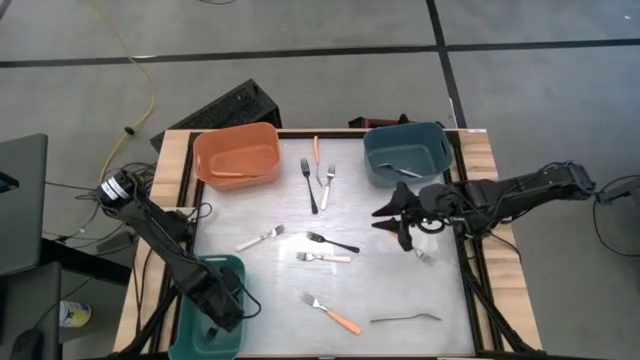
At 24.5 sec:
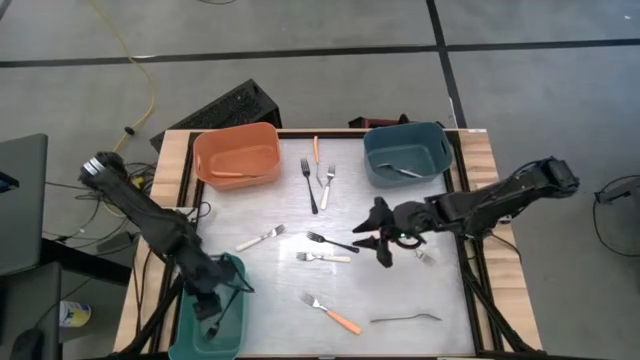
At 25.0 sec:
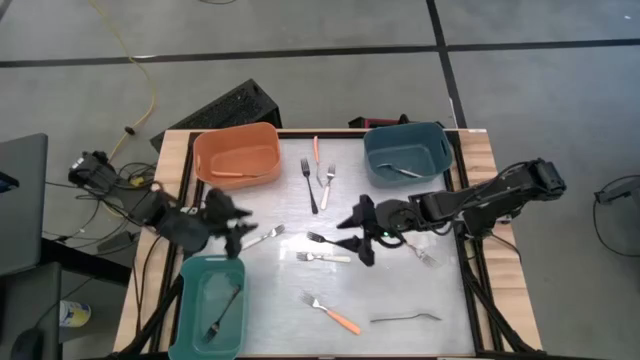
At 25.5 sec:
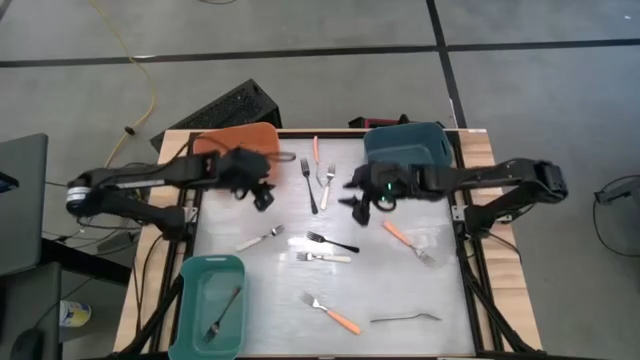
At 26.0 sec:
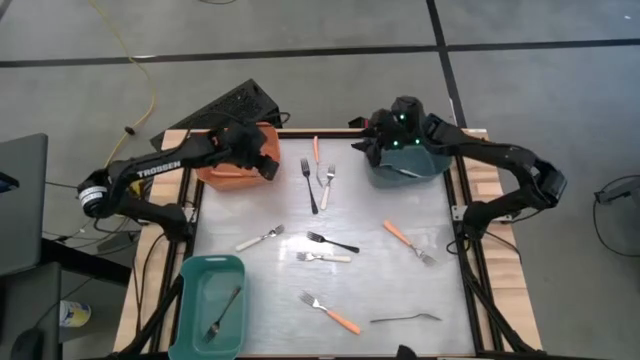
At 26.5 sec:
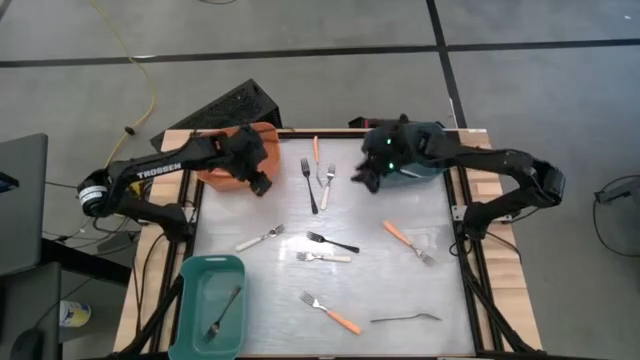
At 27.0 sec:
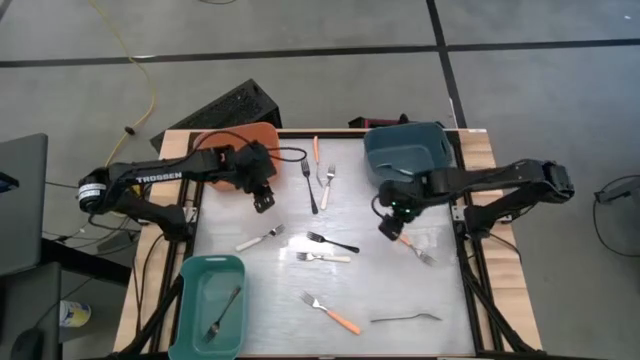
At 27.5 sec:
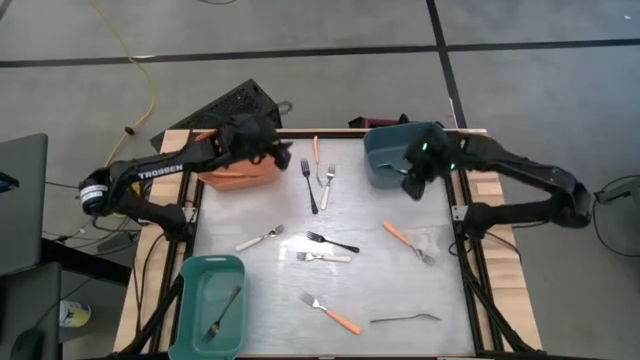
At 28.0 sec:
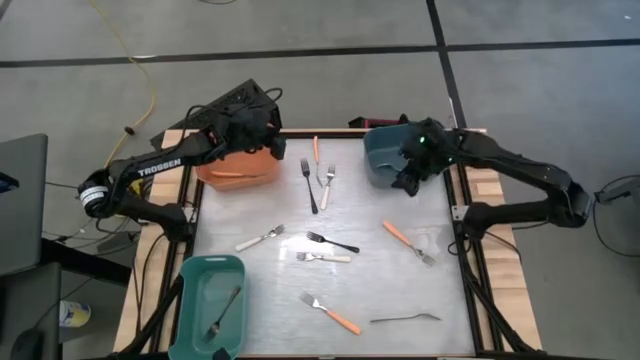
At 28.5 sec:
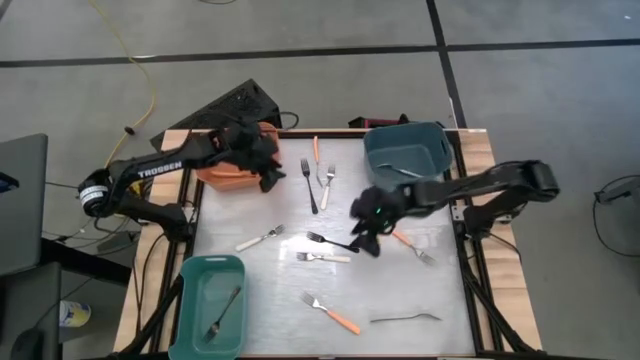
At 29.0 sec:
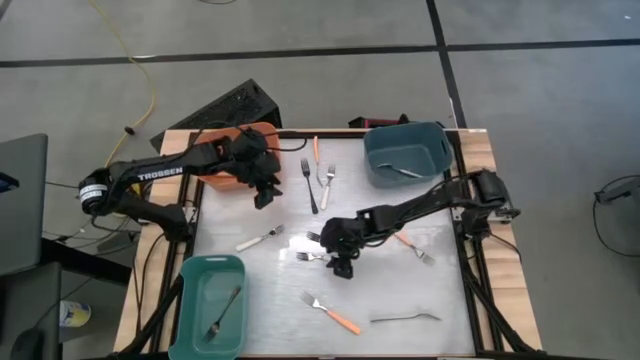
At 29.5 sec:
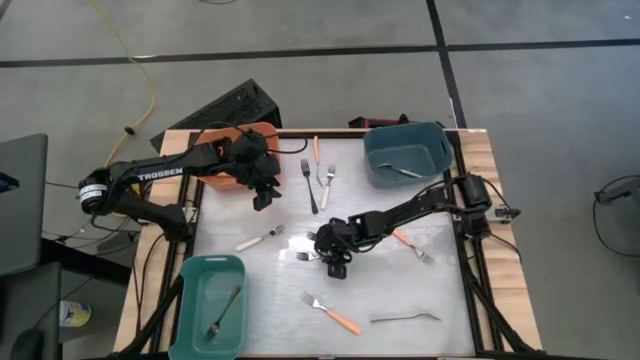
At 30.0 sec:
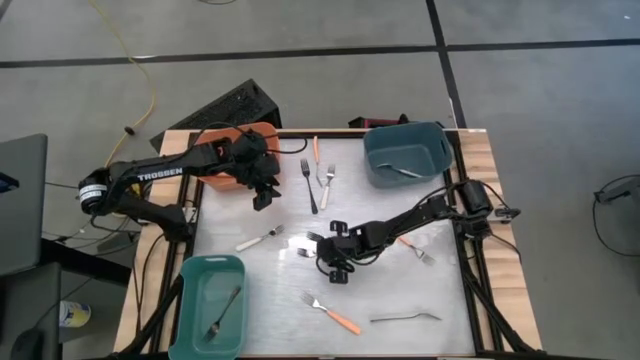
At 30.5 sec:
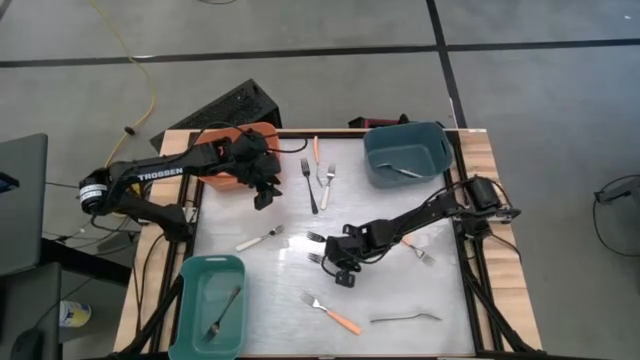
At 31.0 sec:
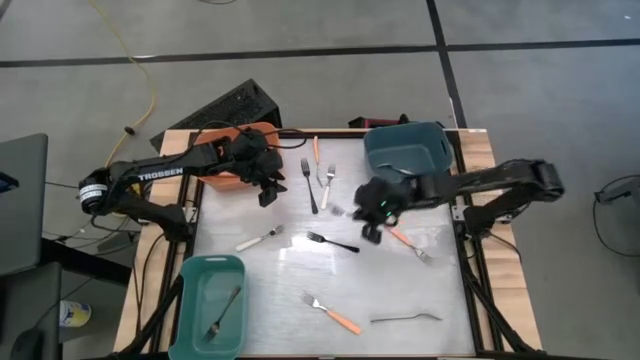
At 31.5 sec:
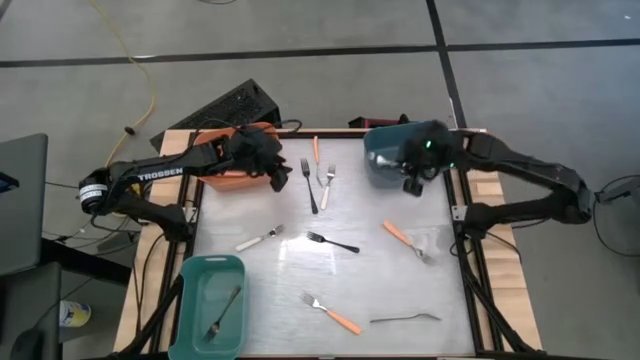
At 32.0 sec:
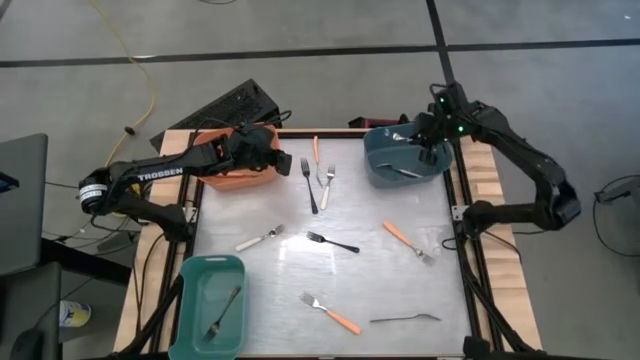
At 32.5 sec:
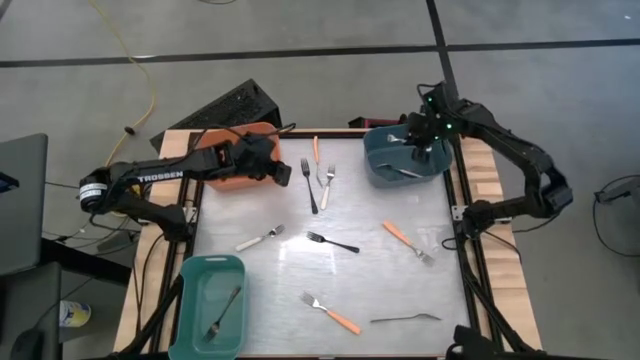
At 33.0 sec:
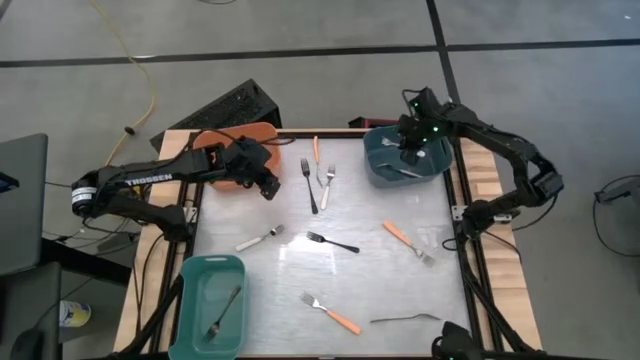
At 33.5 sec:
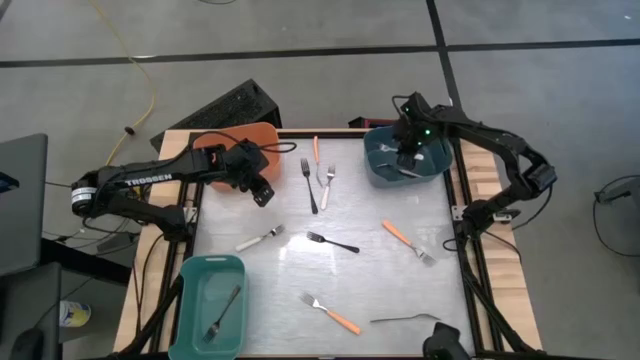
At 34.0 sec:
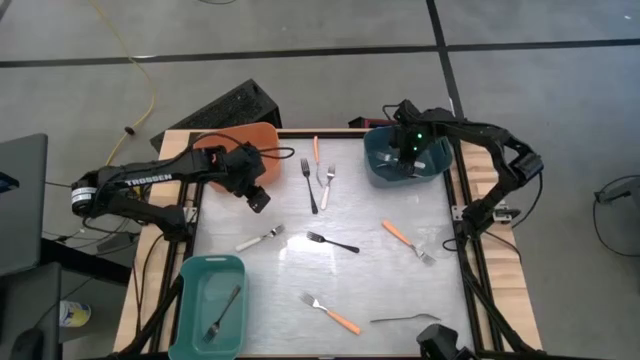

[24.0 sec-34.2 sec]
Task: Sort silverware by color (type)
Put the white fork into the blue bin

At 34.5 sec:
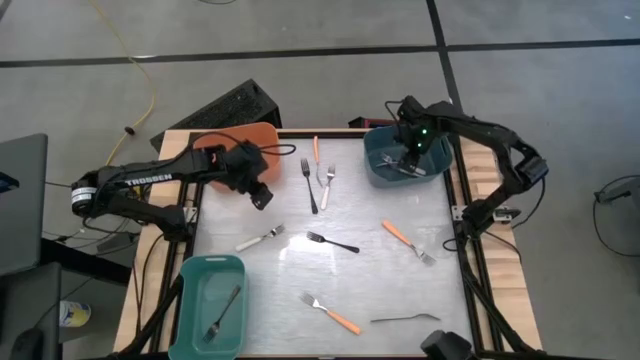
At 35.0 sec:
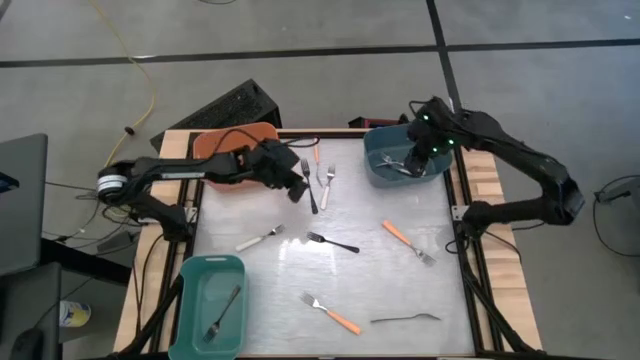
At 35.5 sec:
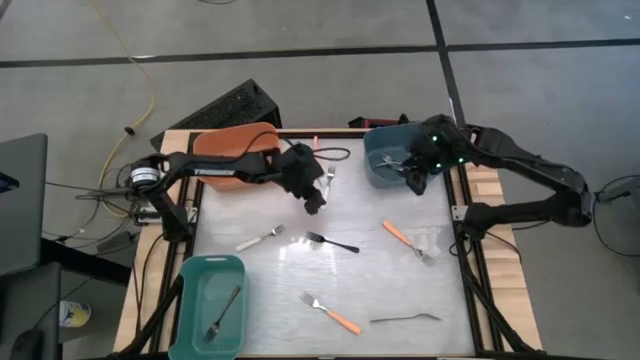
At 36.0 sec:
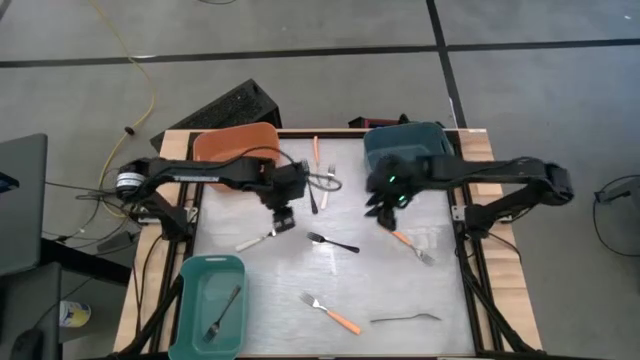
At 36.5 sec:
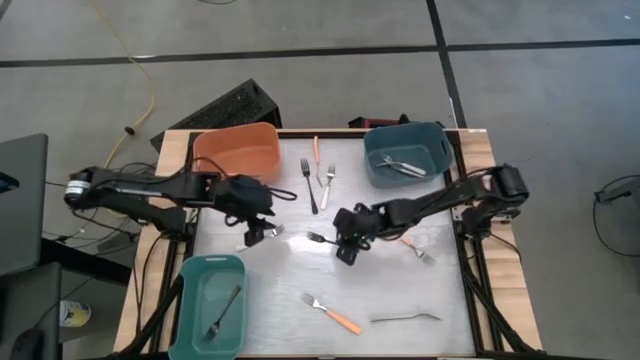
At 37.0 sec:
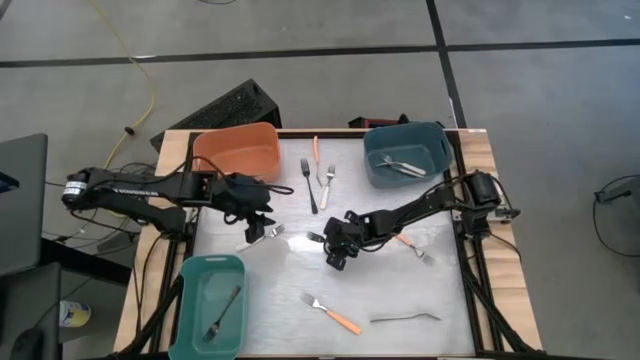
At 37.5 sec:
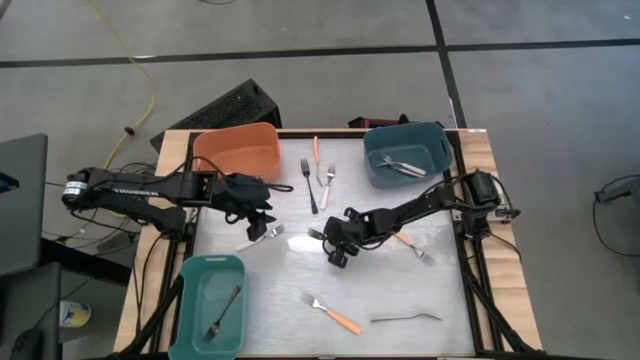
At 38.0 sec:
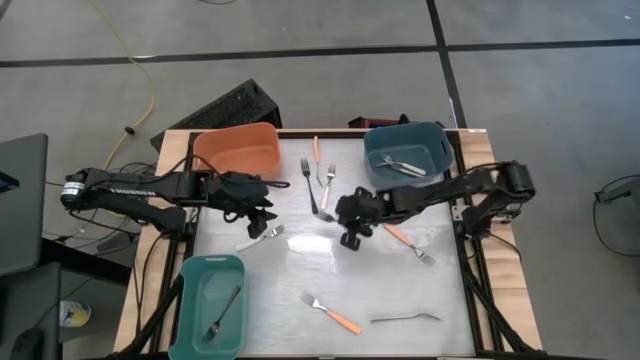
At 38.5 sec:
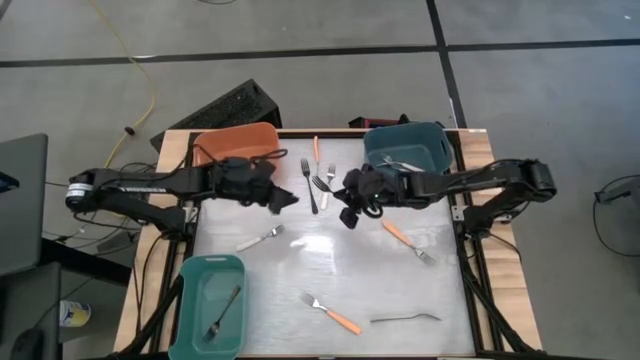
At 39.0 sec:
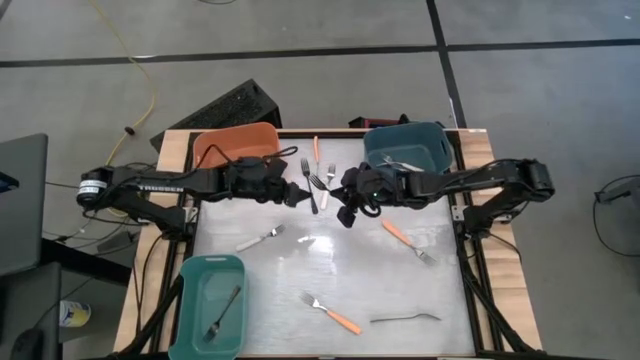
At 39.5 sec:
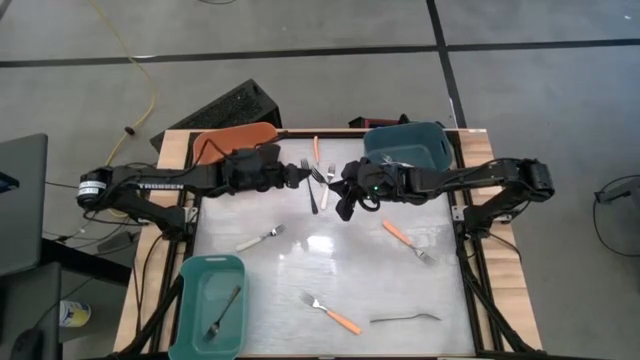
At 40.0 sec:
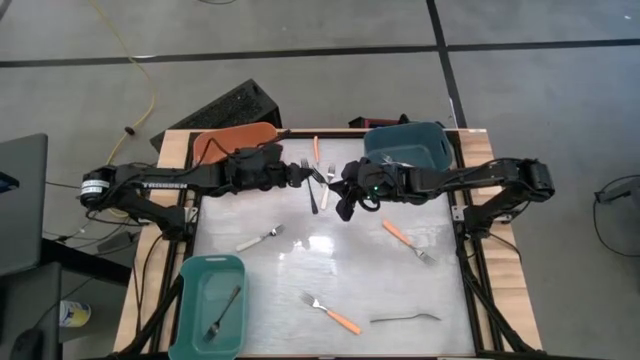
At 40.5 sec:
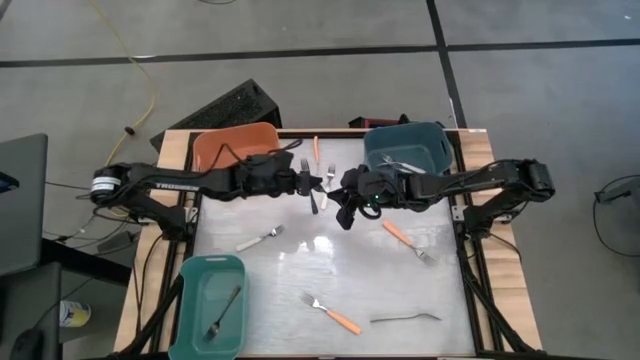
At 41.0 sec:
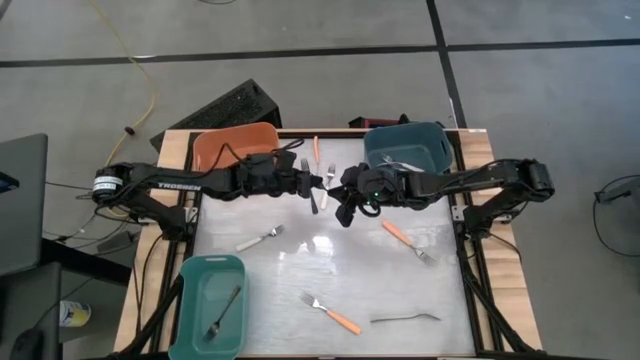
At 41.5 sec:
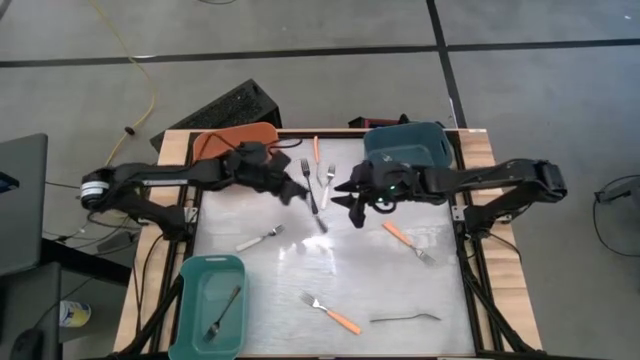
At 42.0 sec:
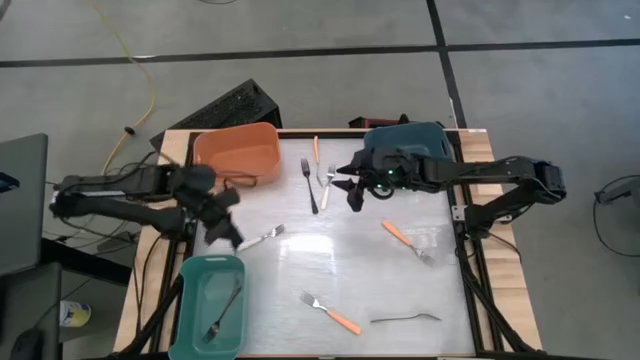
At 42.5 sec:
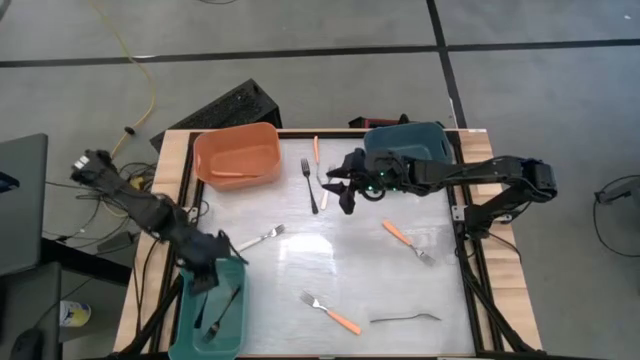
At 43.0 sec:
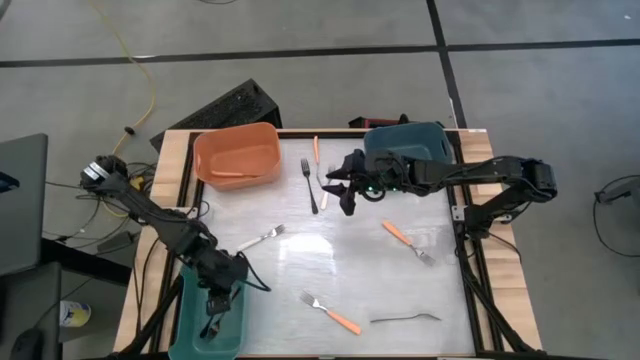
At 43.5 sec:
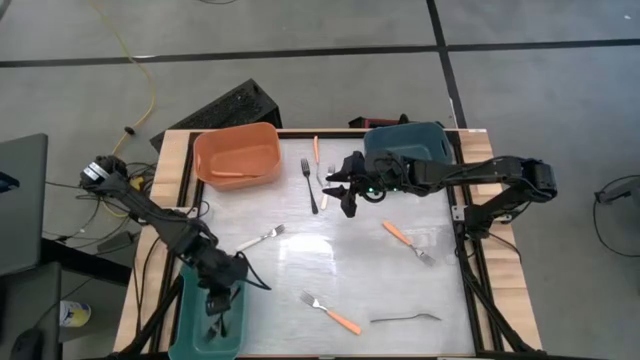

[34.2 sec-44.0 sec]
Put the black fork into the green bin
